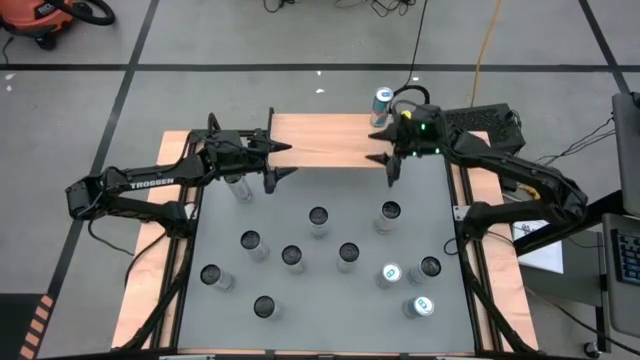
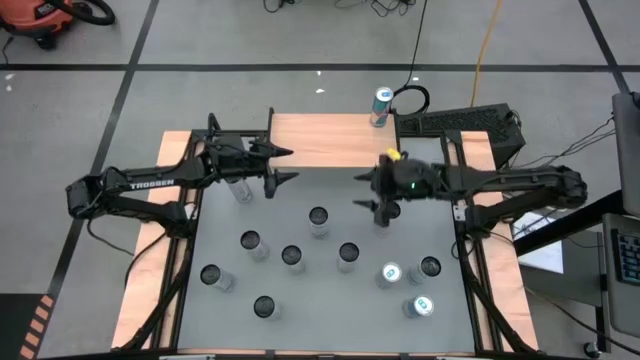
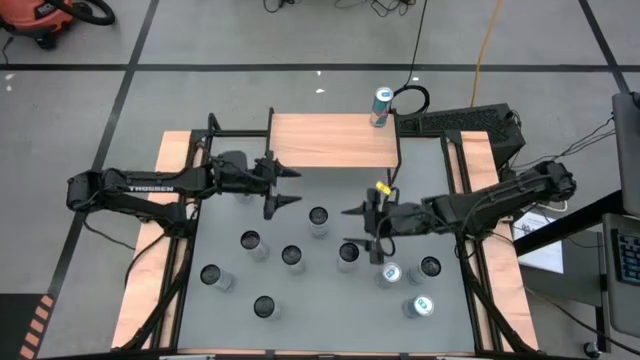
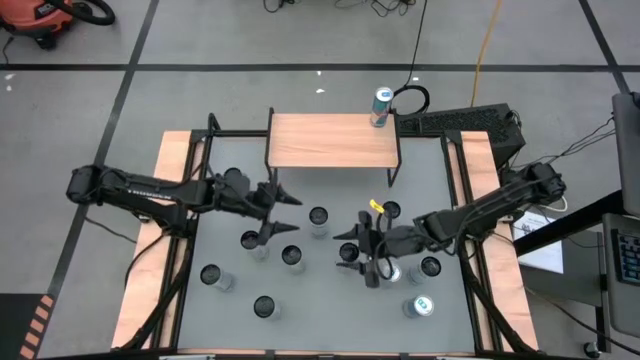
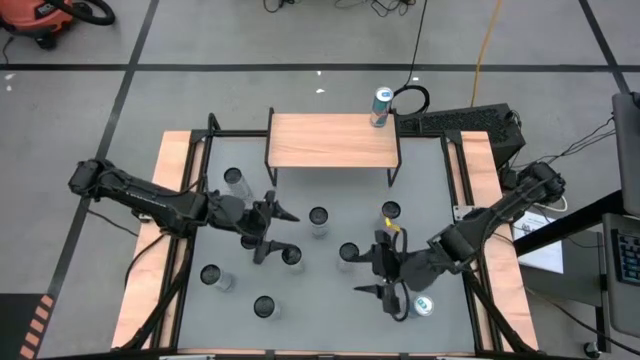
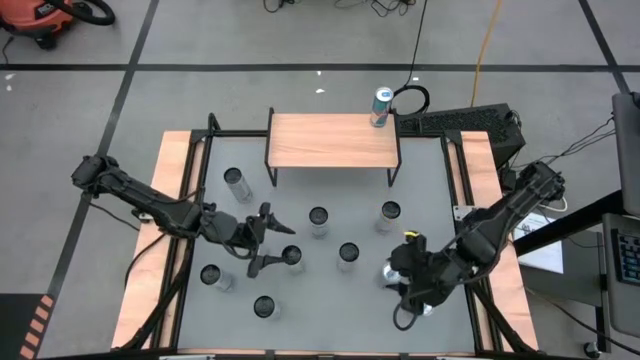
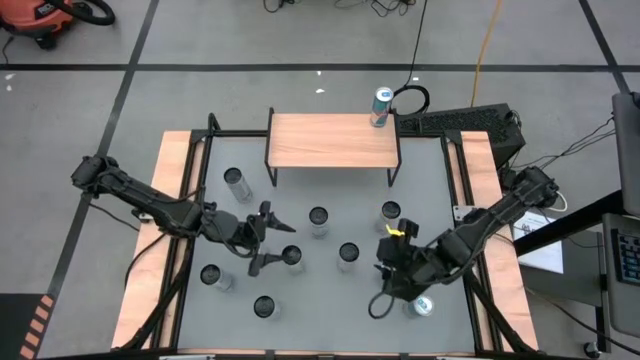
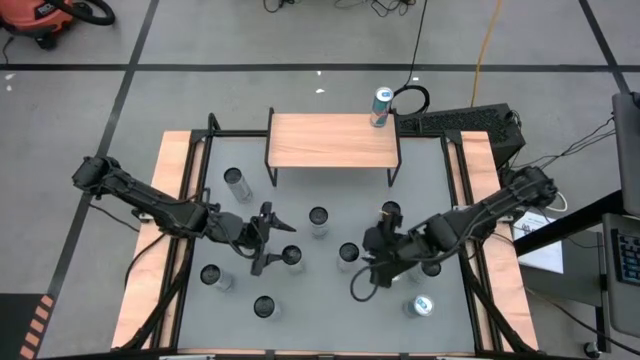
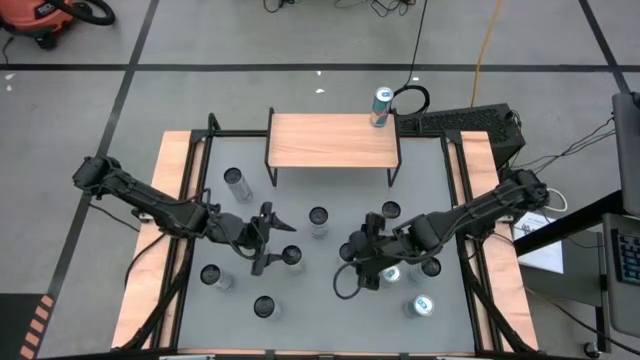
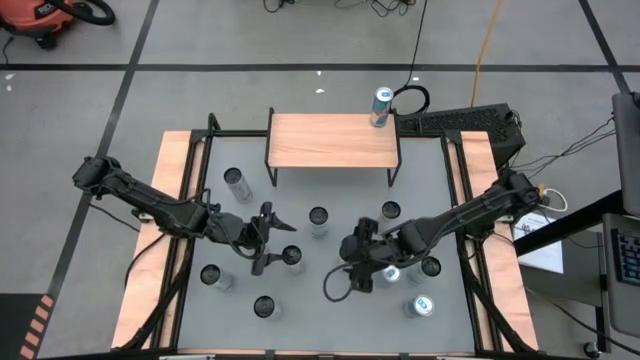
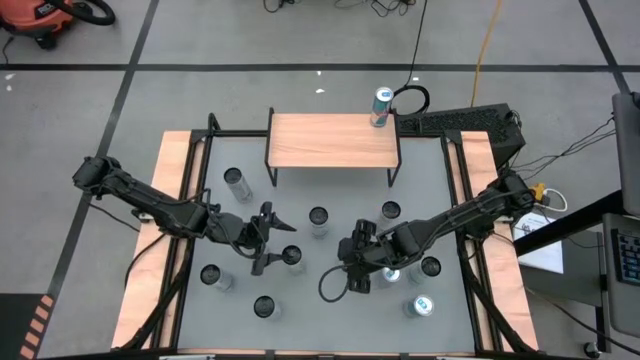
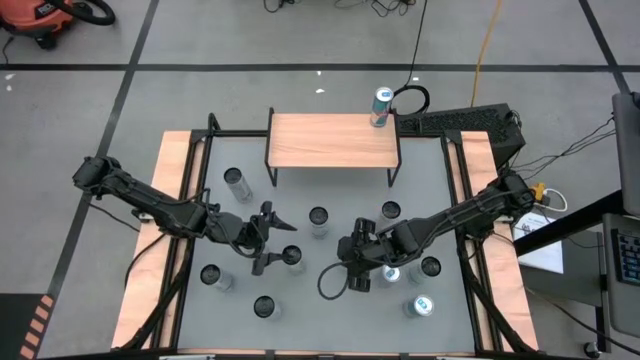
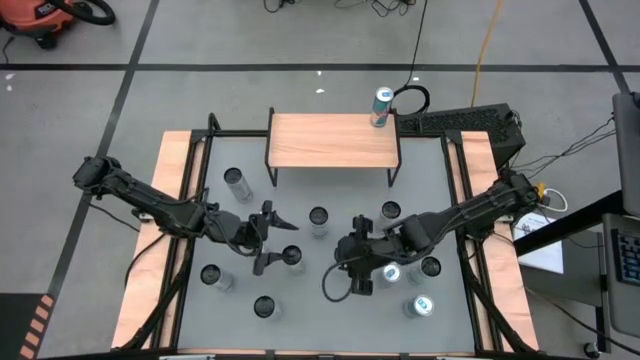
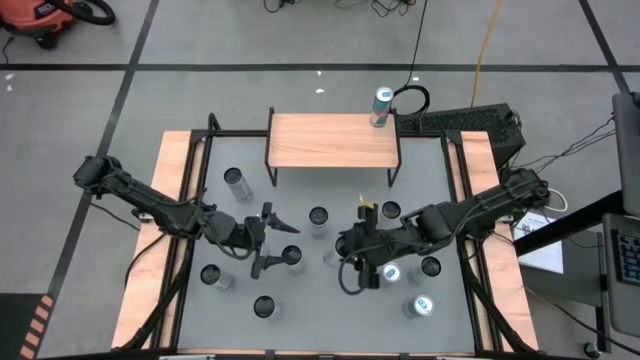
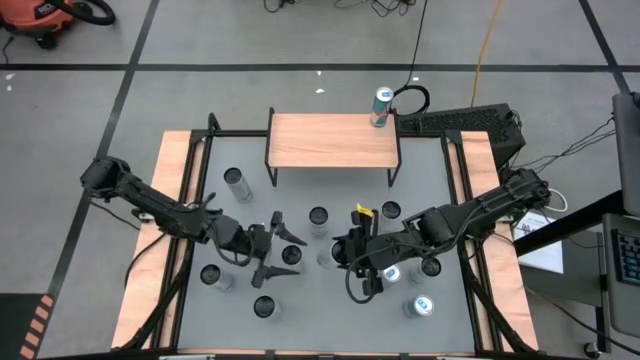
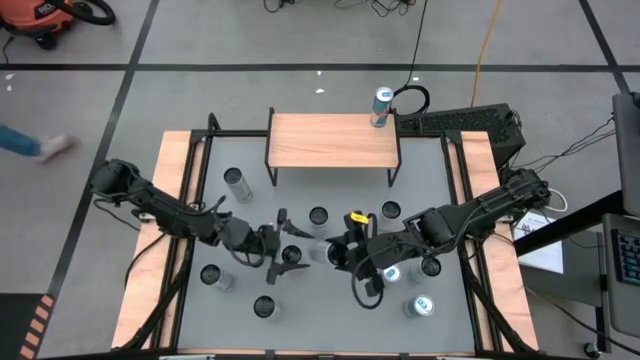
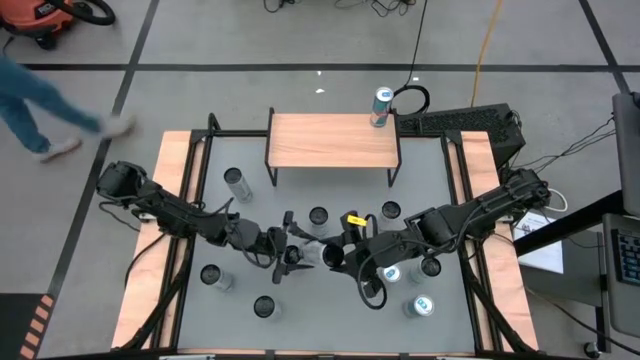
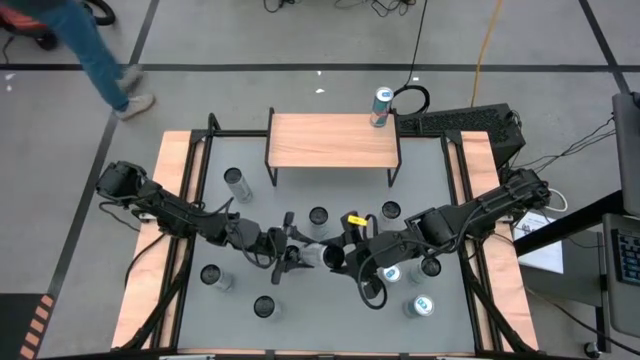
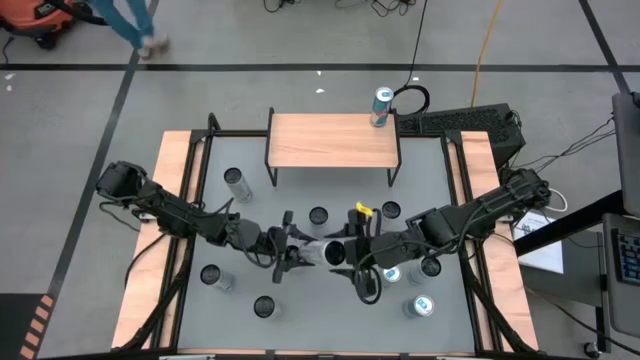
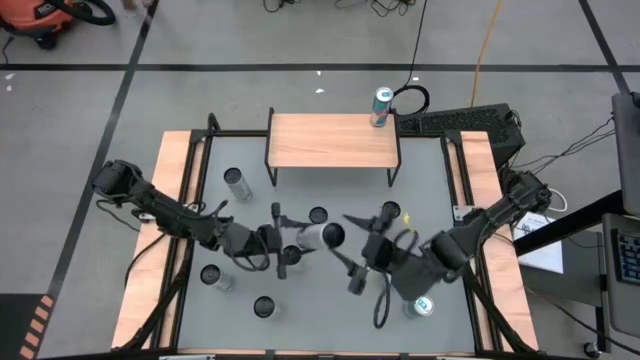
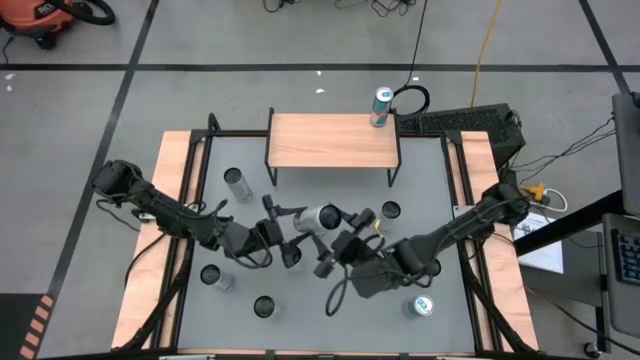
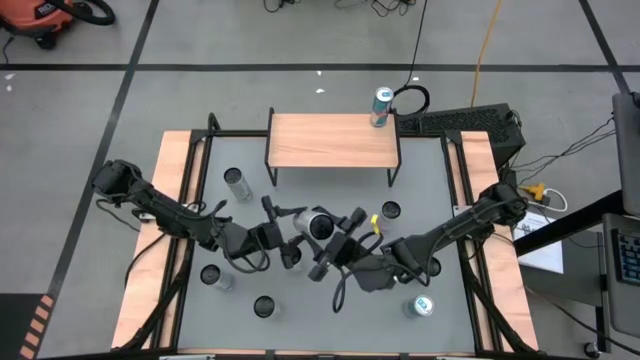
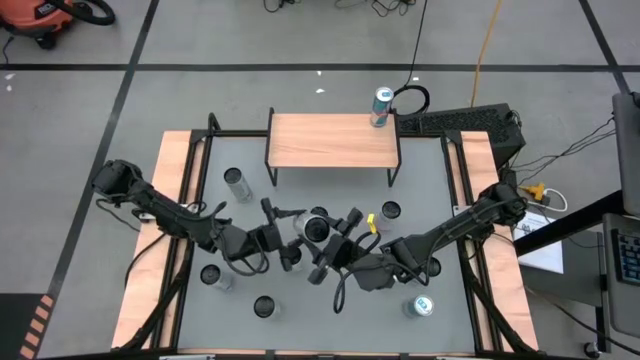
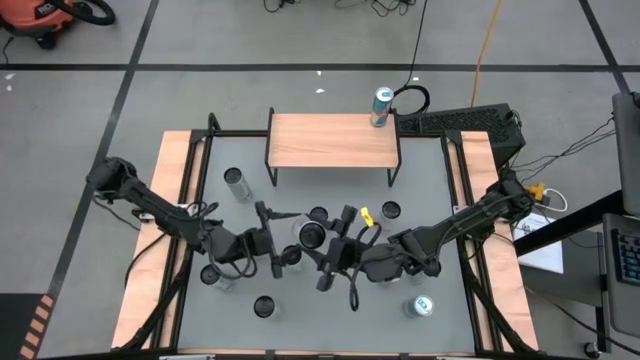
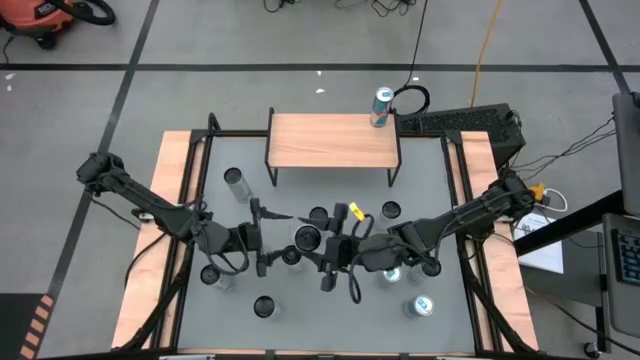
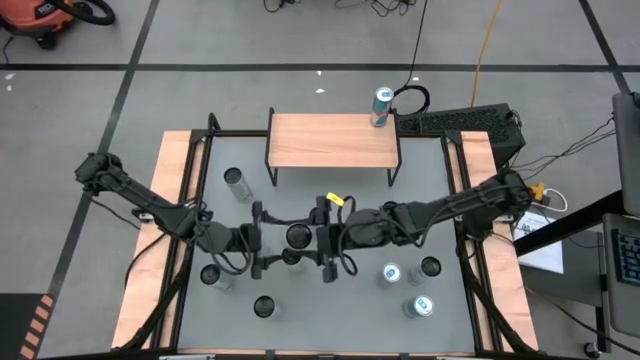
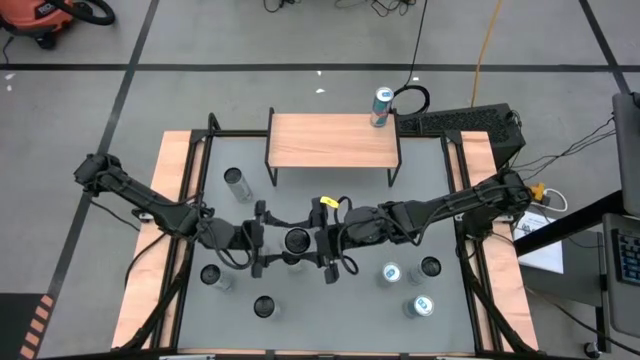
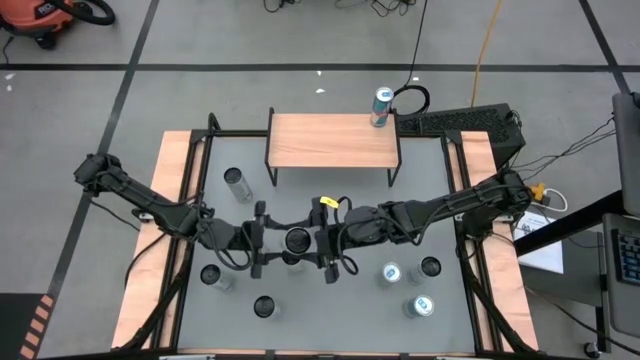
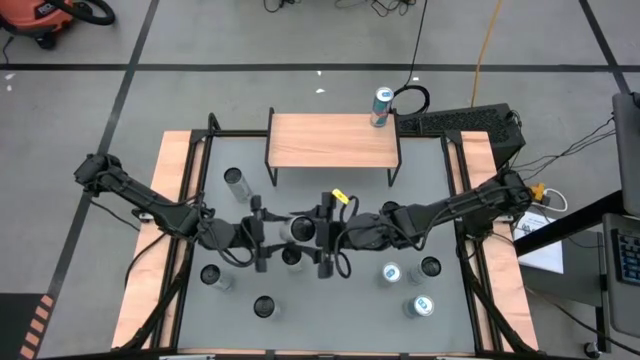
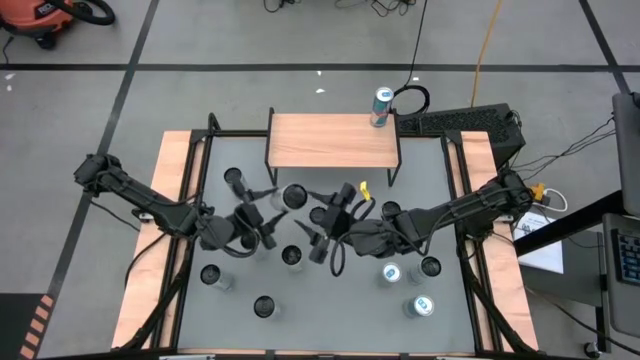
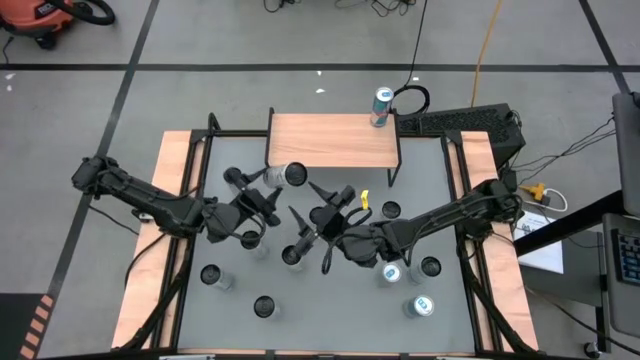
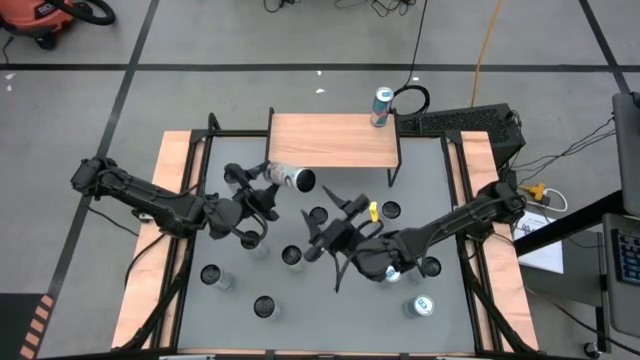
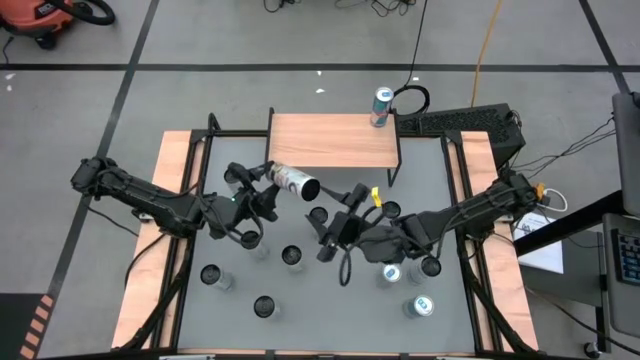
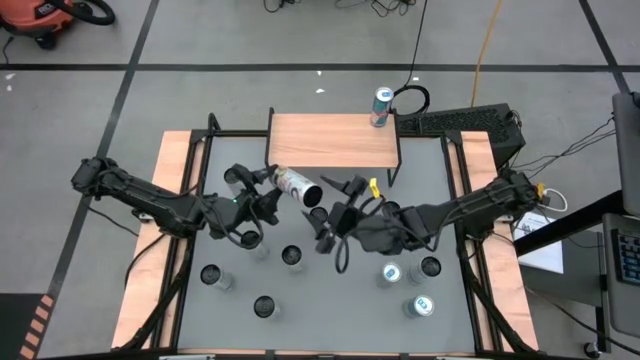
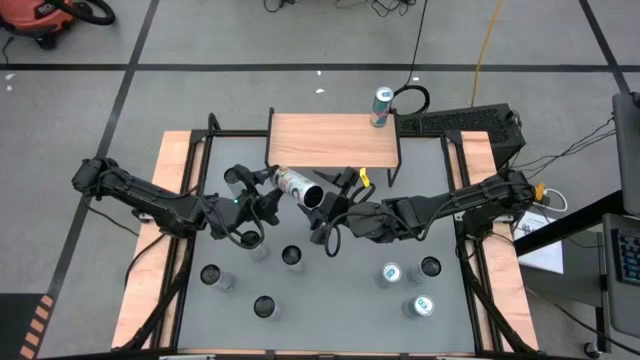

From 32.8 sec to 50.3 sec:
Task: Place canned beverage on shelf
Put the right white yellow soda can on the shelf
